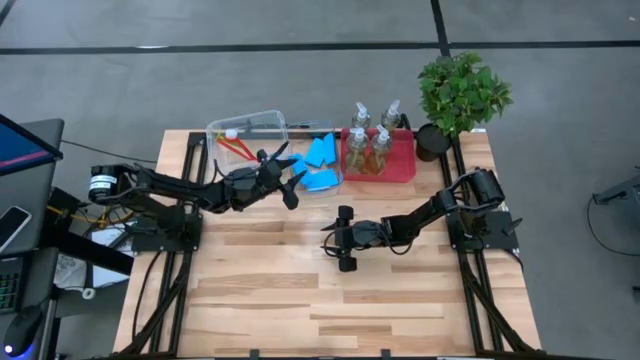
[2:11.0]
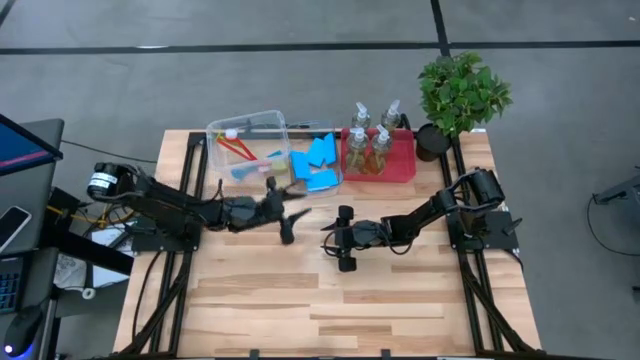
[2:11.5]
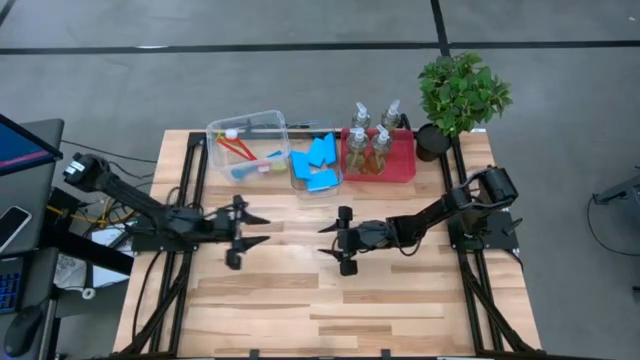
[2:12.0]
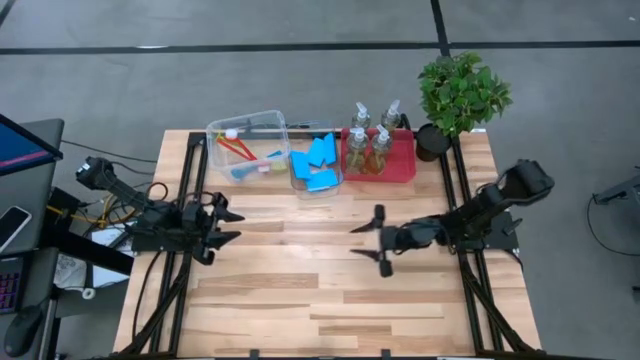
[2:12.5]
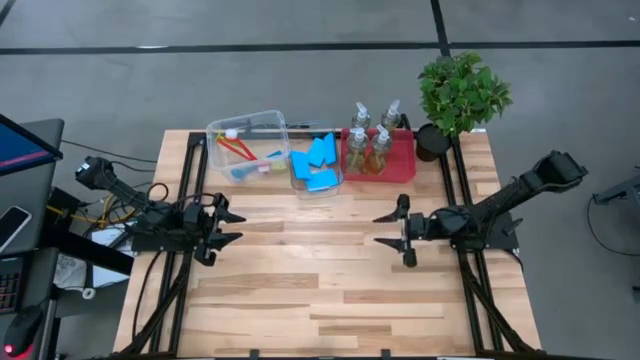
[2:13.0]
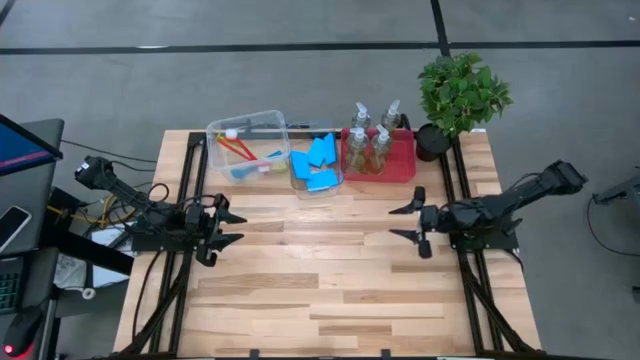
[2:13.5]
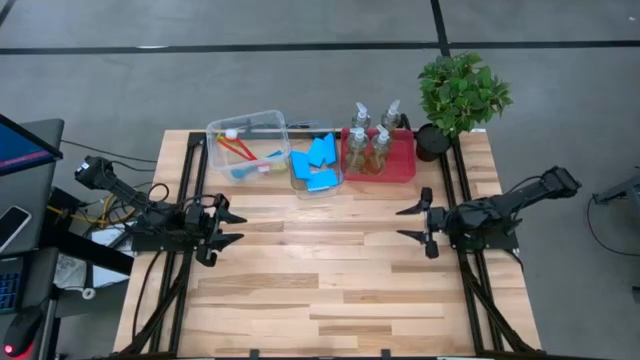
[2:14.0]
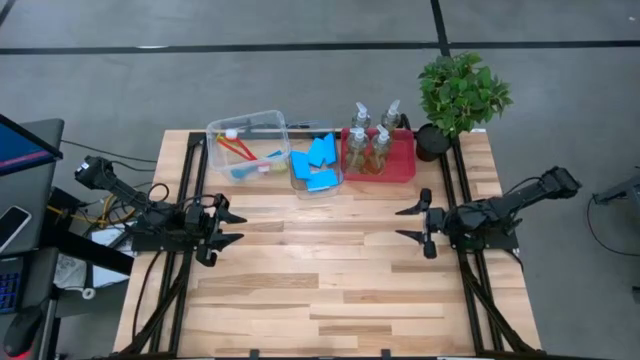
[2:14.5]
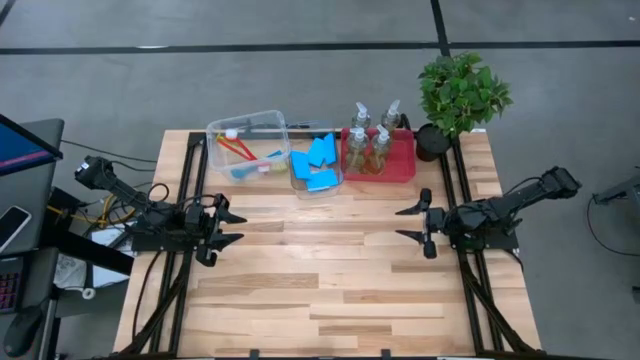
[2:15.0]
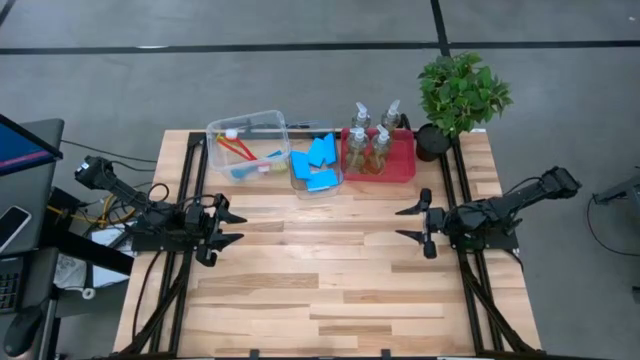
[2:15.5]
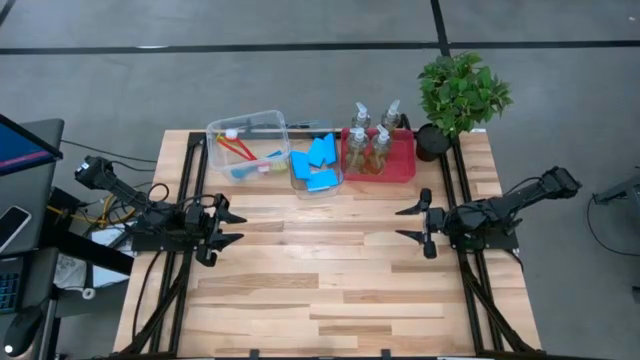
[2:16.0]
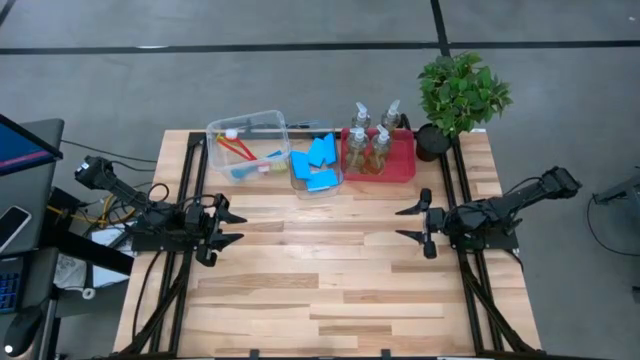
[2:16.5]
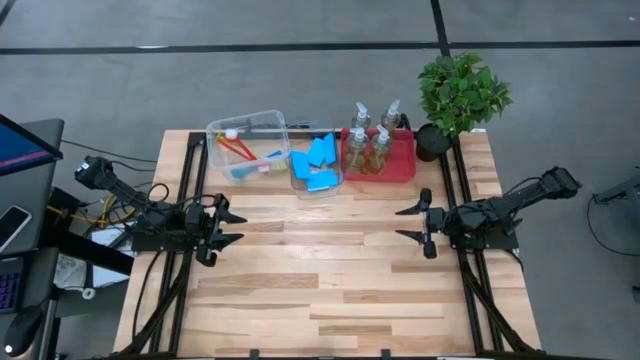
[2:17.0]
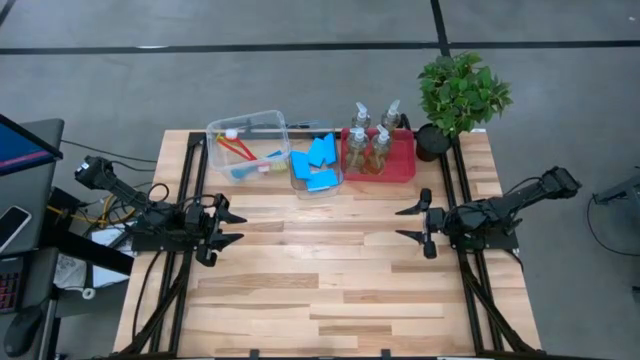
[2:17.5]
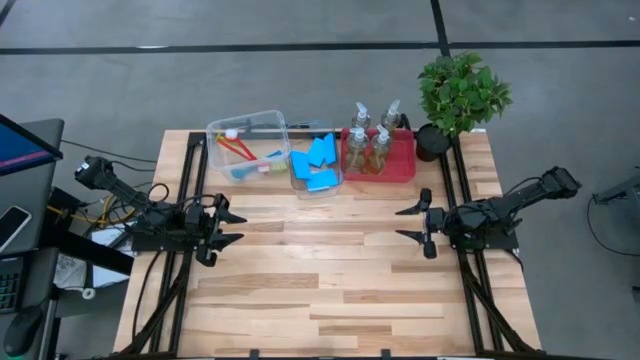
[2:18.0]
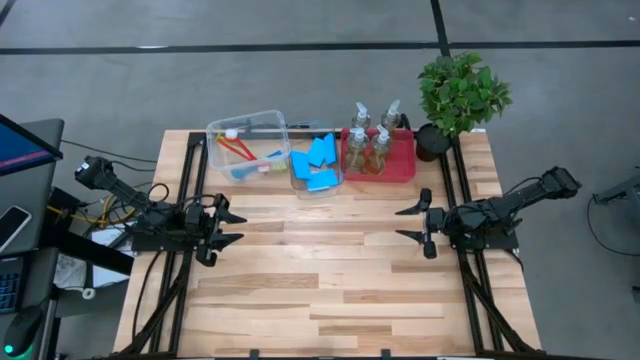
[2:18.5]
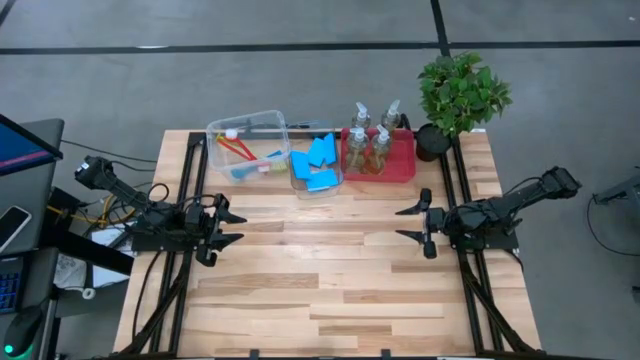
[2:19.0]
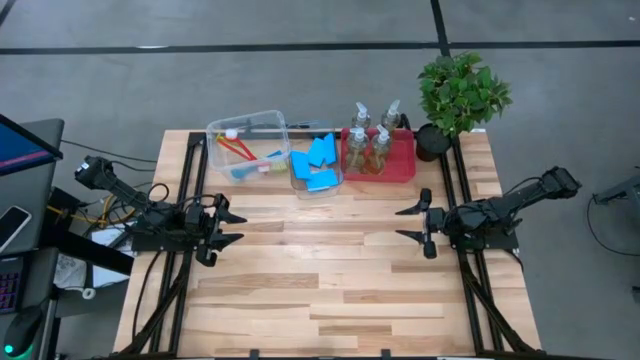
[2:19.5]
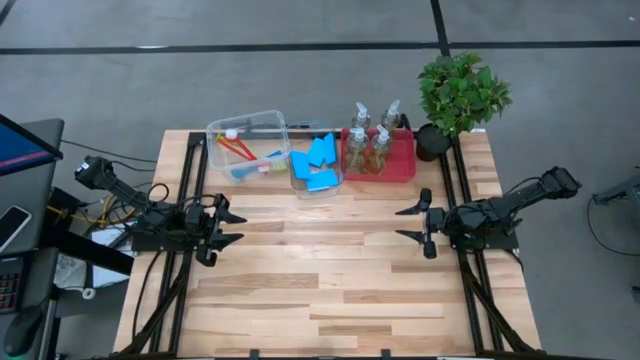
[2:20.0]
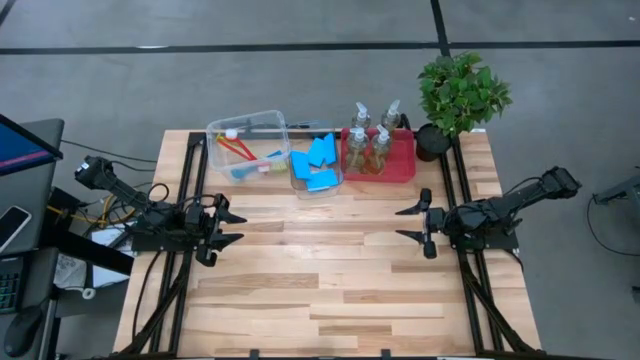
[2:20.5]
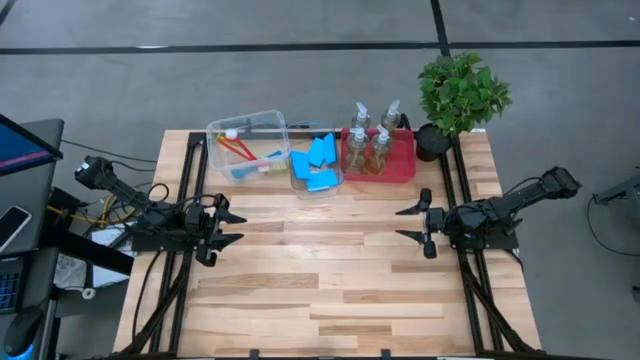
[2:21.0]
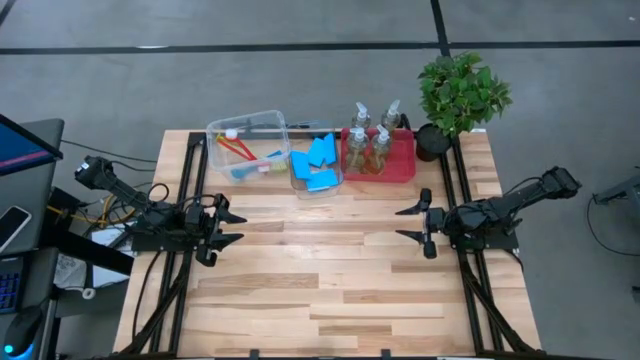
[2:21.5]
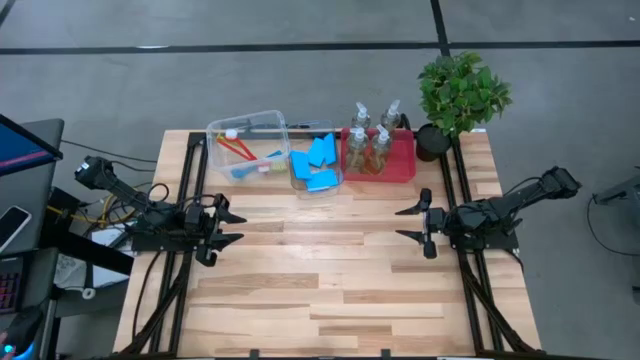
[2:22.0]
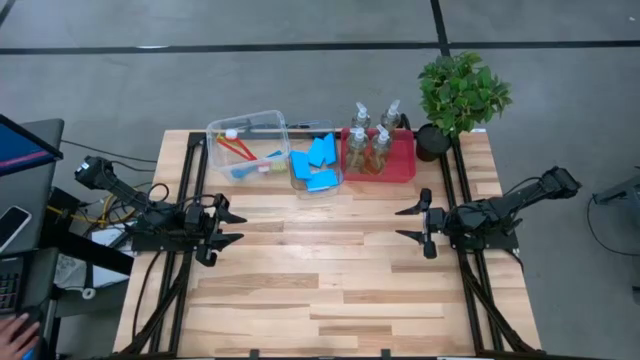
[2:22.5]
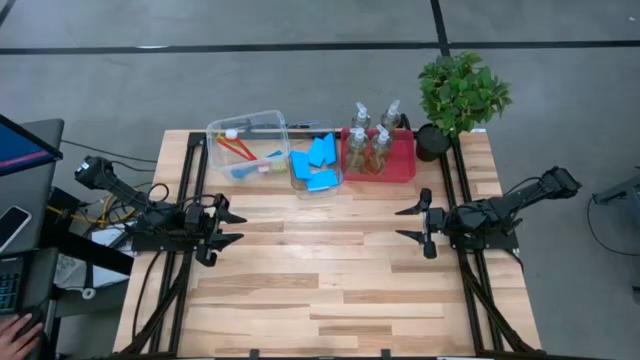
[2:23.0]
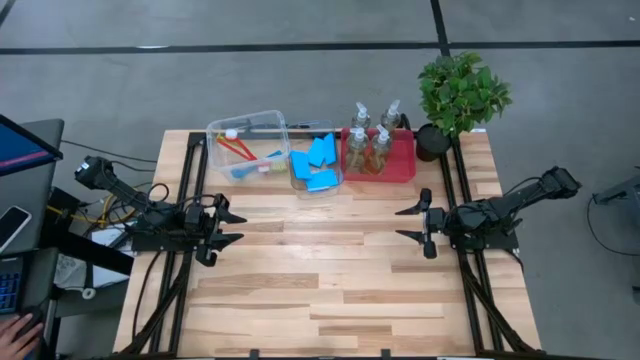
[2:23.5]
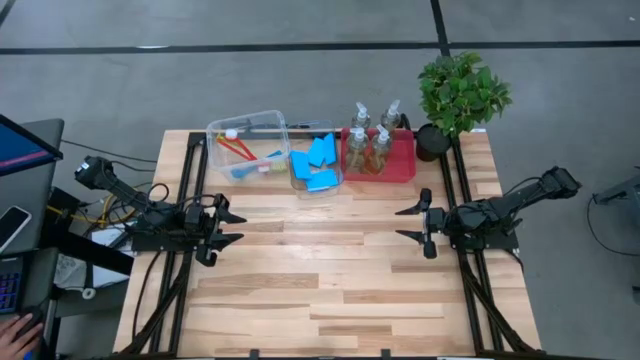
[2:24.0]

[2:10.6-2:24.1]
Task: Pick & Place Kitchen Sink Supplies
Return to Home Position

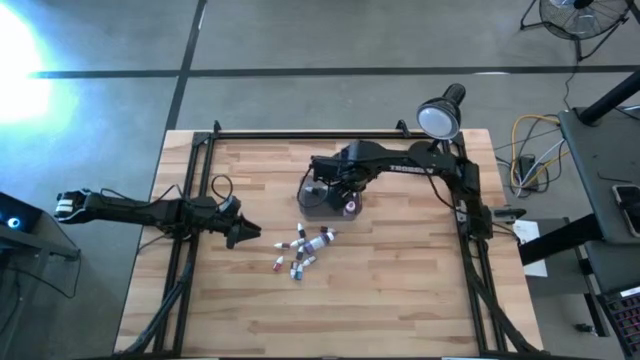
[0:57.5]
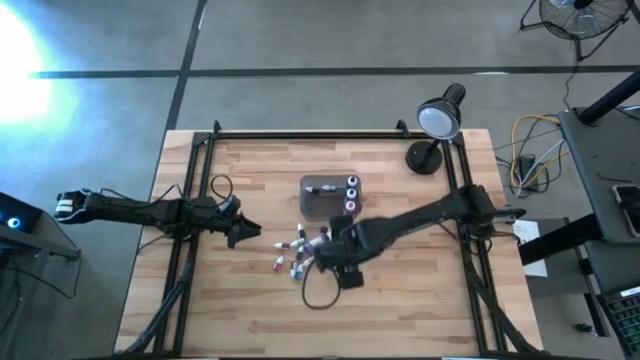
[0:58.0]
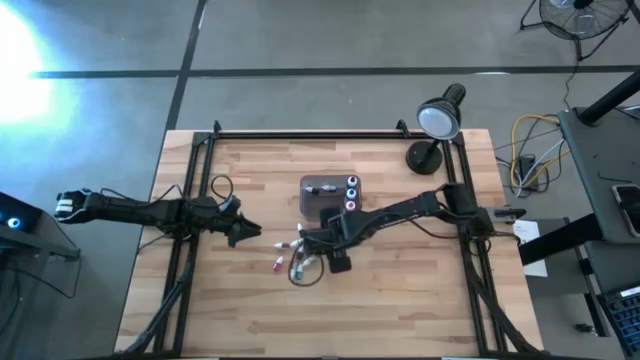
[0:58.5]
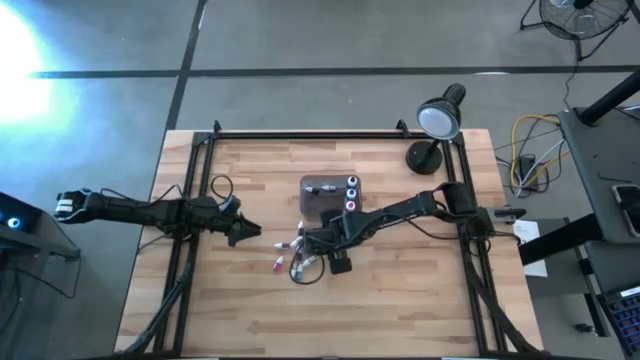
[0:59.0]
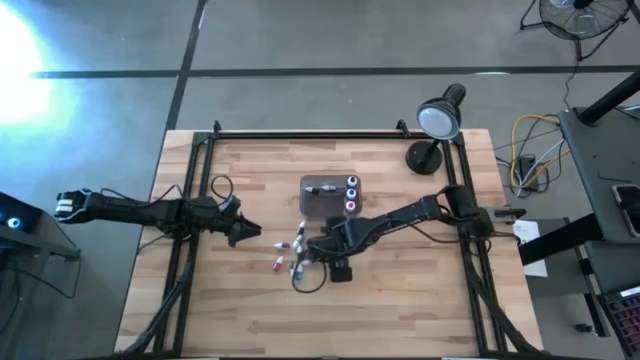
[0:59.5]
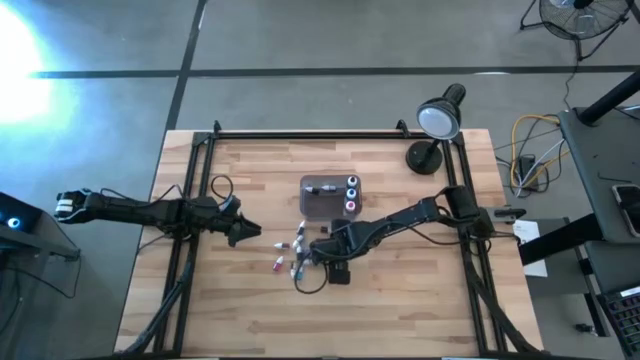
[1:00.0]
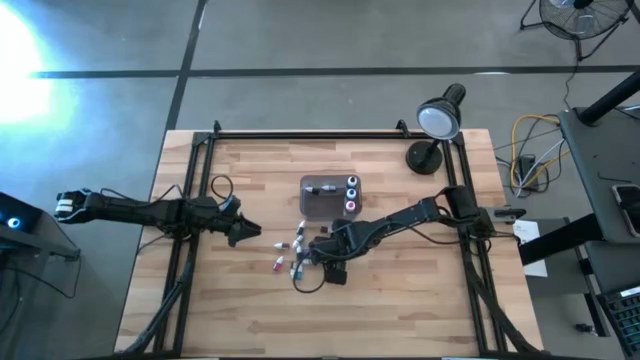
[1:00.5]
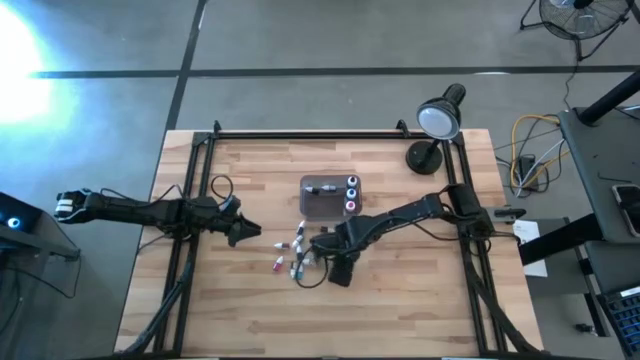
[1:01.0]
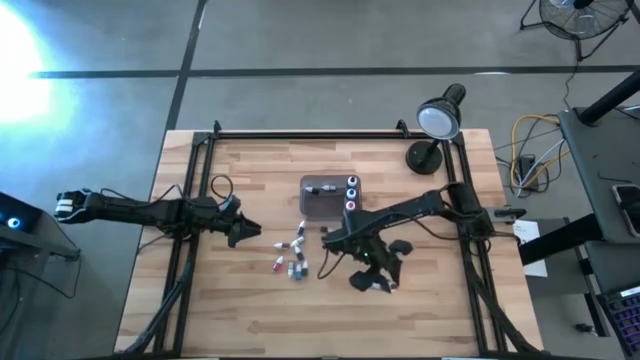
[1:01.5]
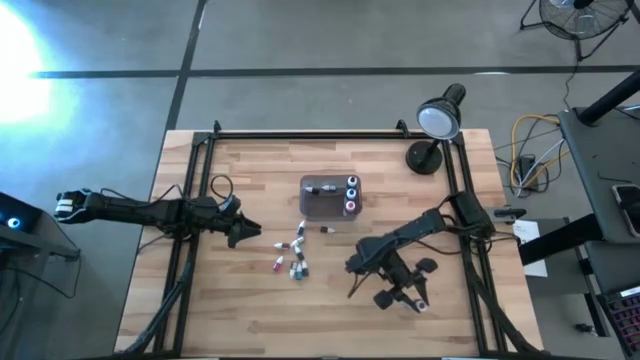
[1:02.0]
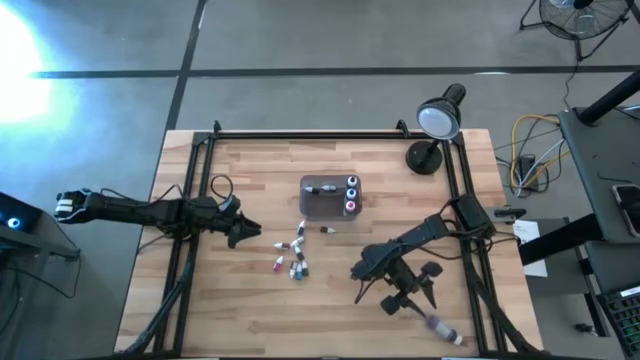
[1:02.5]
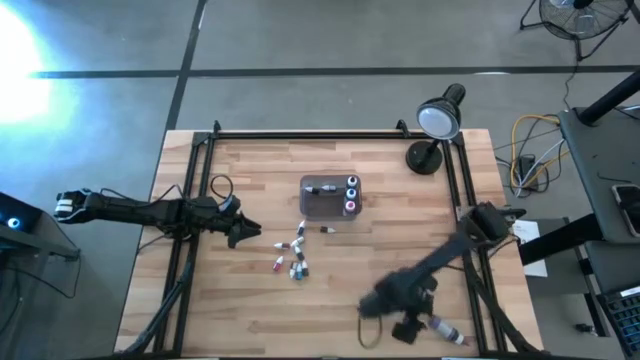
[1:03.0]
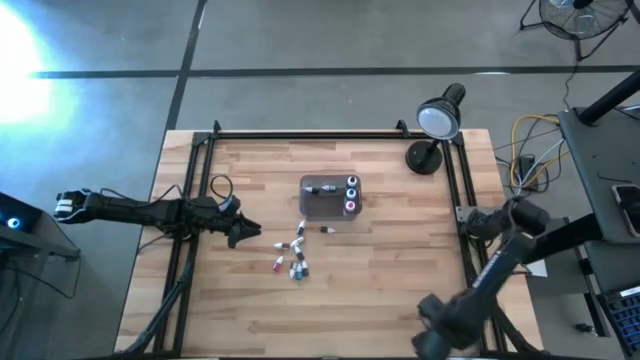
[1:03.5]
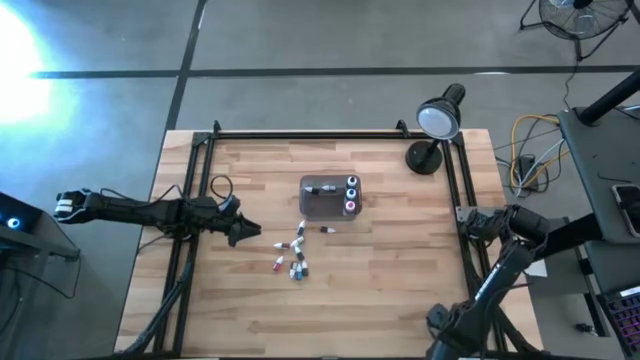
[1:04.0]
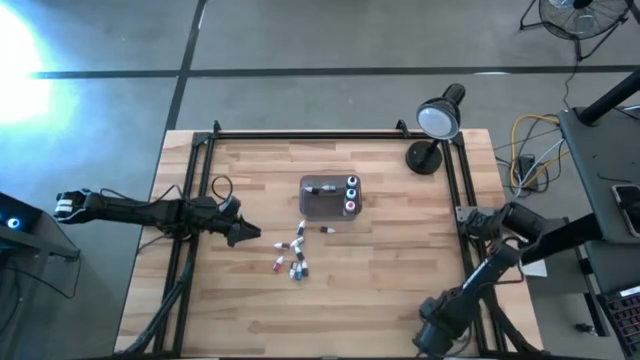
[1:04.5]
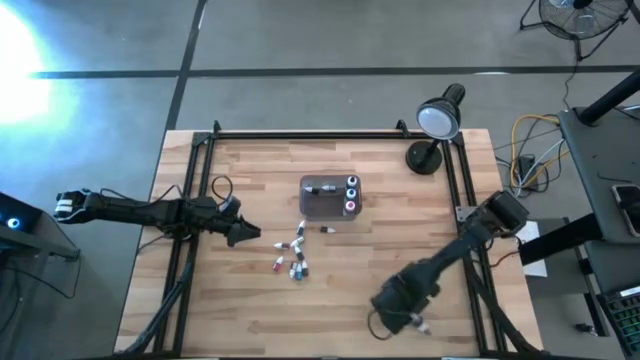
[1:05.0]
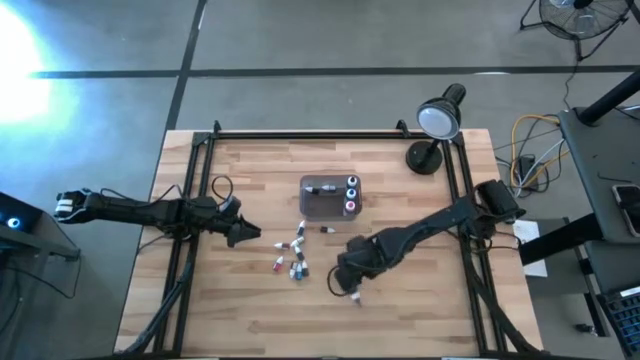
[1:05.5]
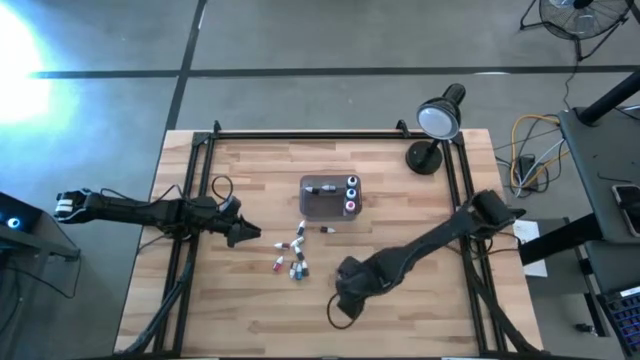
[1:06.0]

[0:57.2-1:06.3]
Task: Pick & Place food coloring
Put the large violet food coloring bottle into the bin
